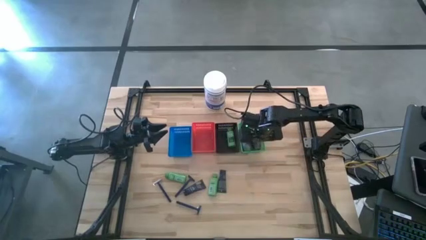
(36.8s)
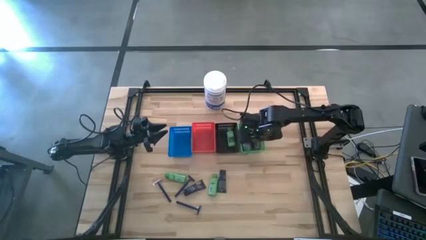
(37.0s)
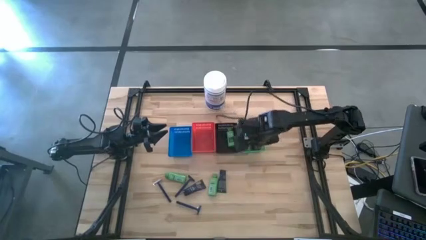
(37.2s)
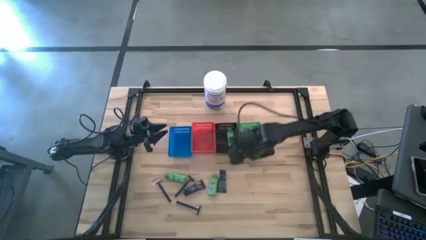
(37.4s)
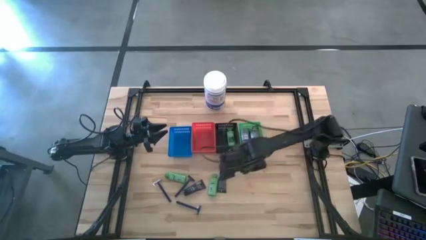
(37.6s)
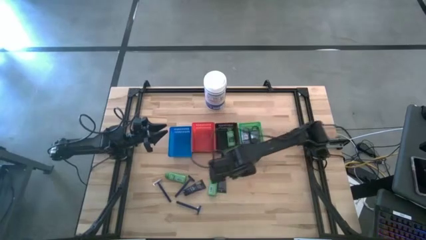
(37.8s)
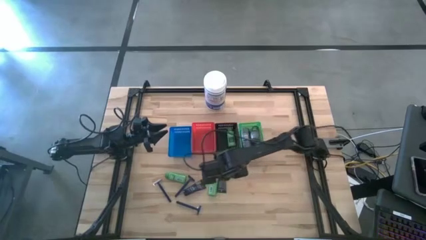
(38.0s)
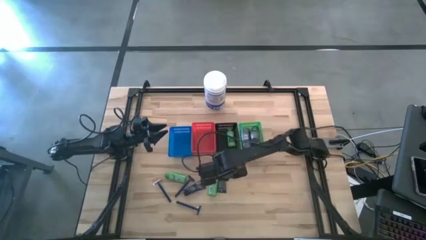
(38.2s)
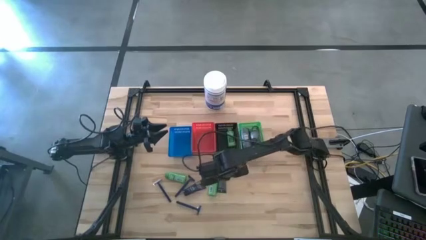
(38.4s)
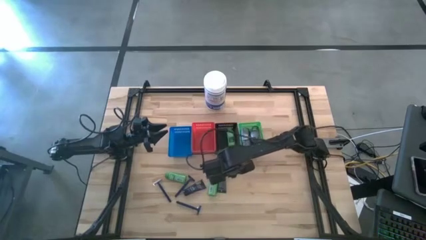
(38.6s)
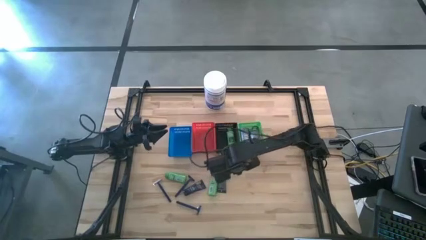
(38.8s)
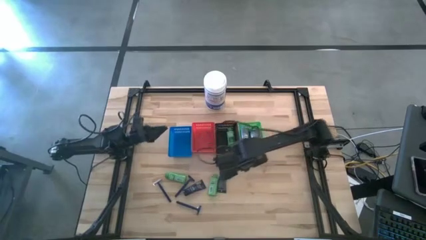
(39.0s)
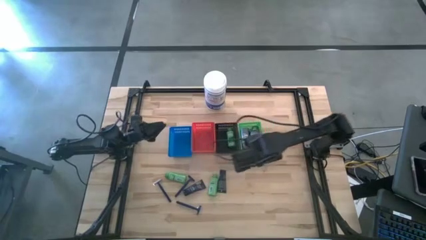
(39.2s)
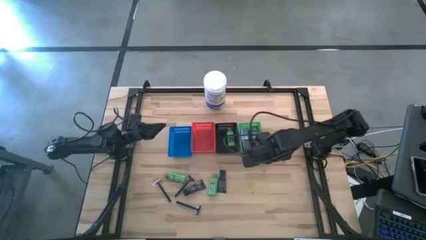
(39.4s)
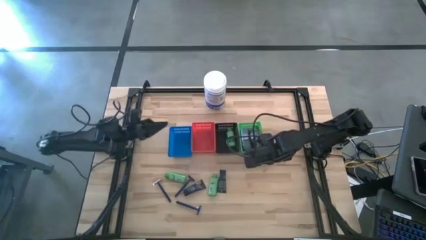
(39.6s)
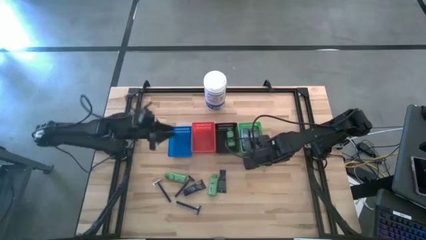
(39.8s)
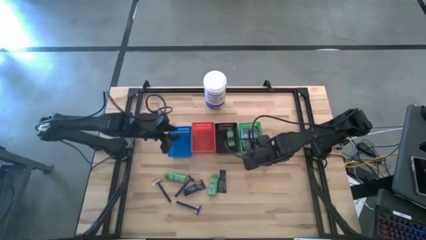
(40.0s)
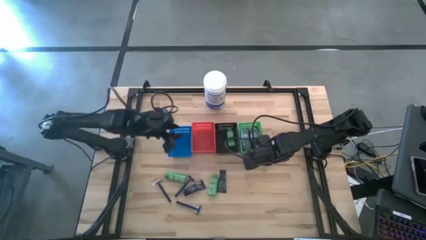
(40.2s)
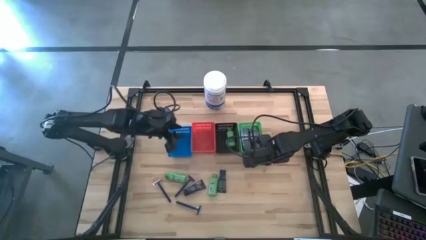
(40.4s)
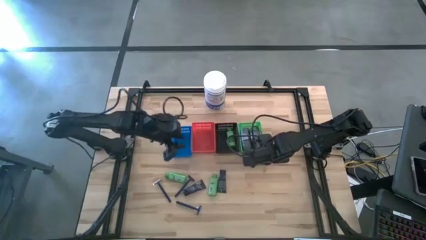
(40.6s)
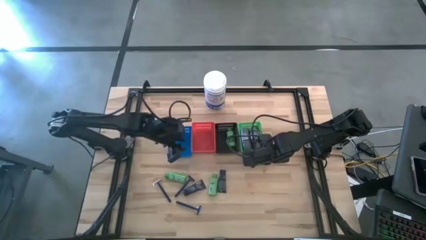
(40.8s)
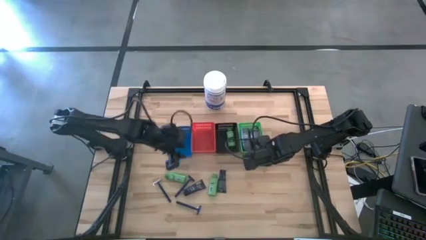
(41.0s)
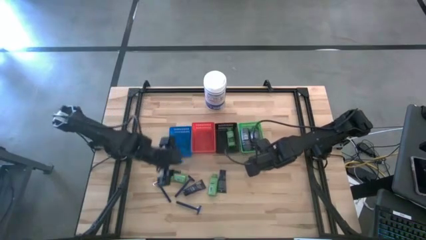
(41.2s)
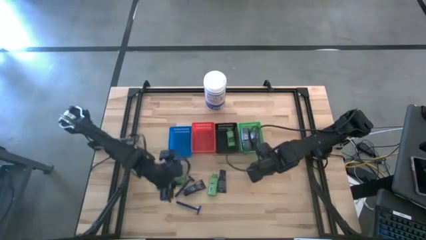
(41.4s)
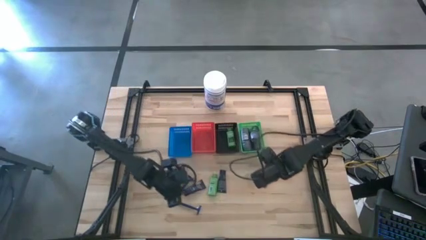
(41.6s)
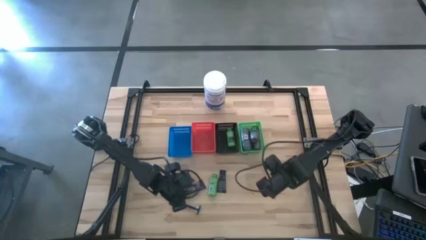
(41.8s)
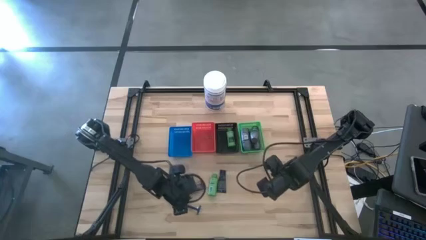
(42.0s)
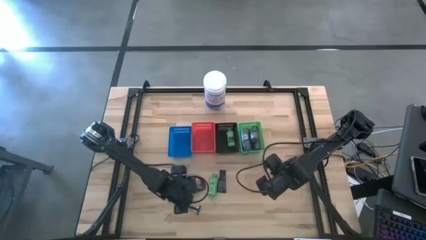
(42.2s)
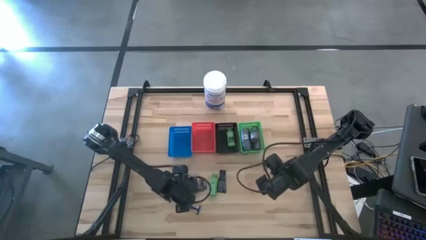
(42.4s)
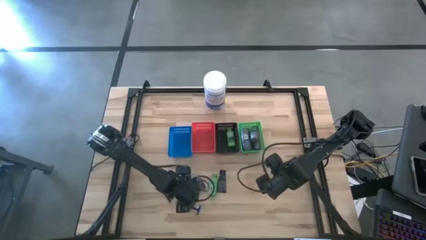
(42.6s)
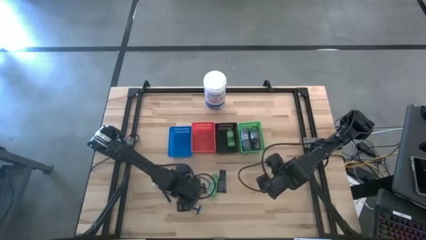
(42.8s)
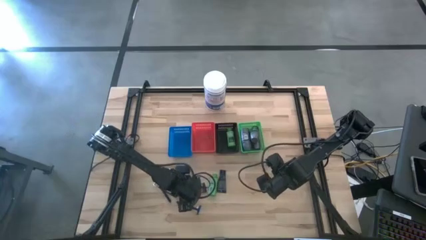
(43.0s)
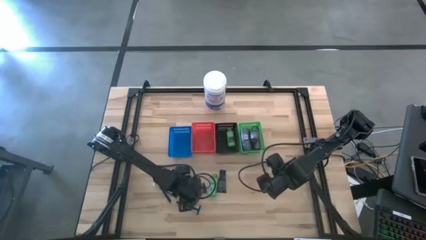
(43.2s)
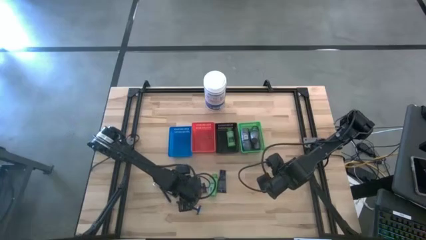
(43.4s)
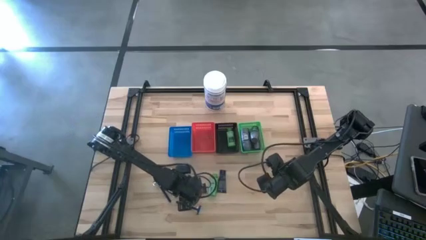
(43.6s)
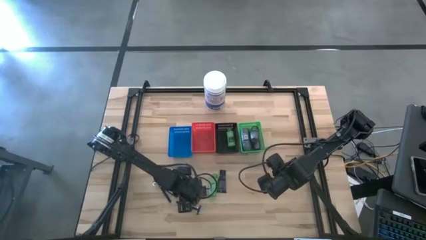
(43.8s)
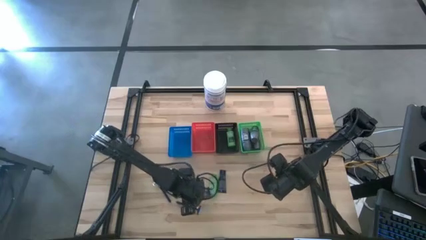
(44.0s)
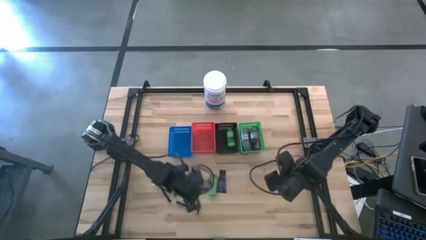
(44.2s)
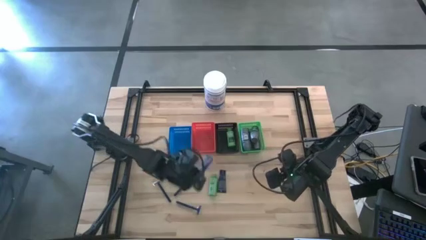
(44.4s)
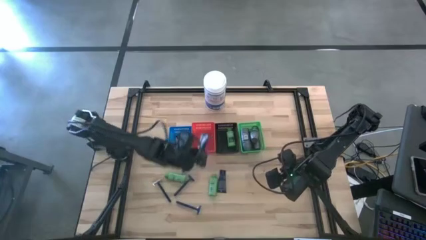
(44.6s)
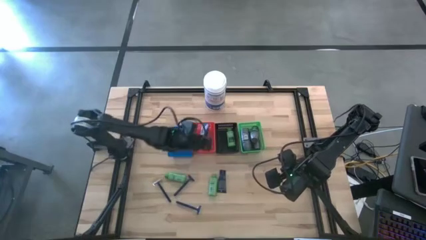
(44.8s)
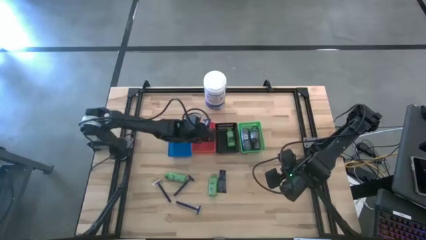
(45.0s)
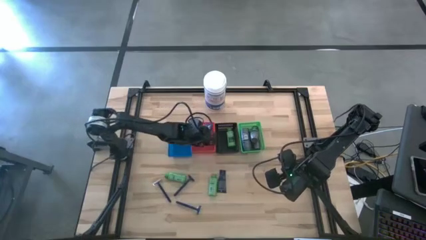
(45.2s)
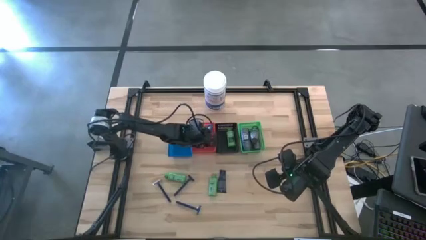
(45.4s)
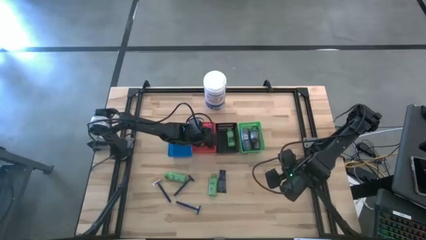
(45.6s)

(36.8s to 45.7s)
Task: Pick & Place Travel size toiletries
Put the blue shaving cream into the red basket

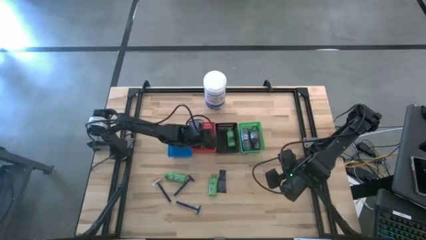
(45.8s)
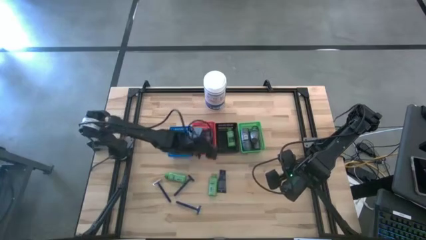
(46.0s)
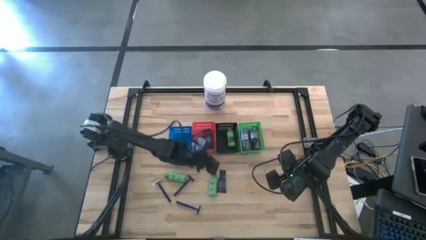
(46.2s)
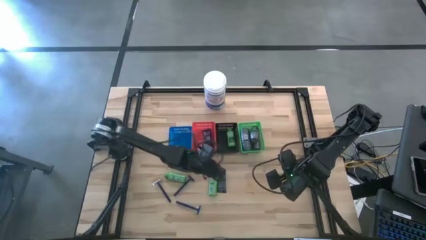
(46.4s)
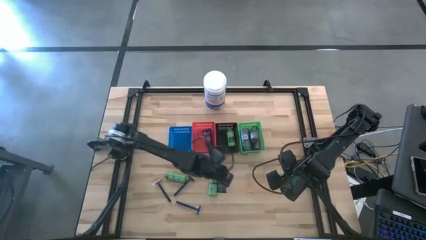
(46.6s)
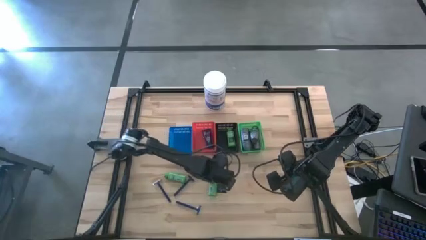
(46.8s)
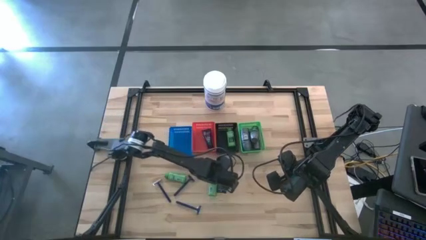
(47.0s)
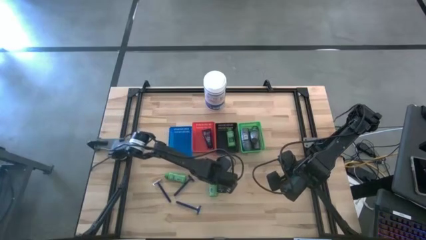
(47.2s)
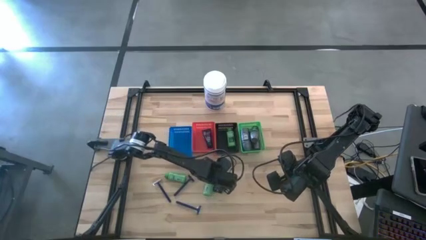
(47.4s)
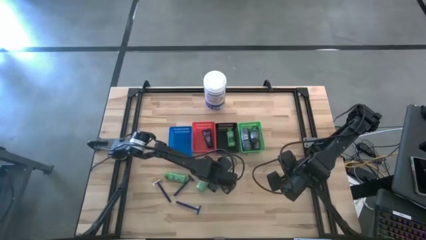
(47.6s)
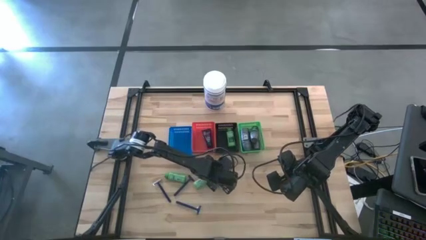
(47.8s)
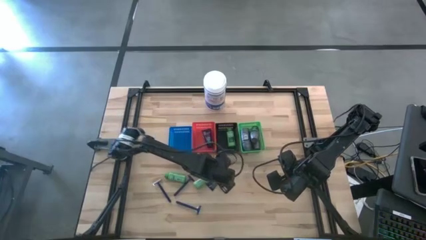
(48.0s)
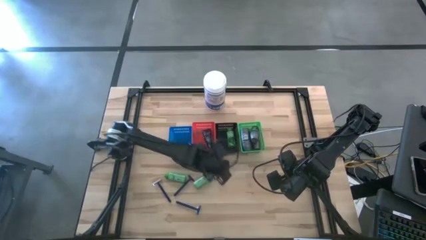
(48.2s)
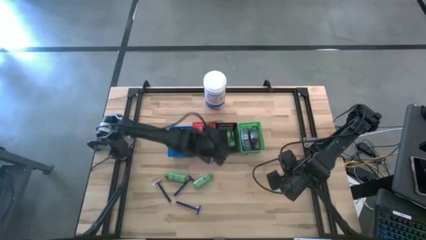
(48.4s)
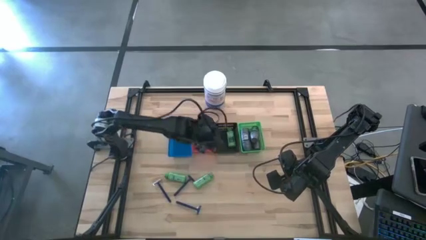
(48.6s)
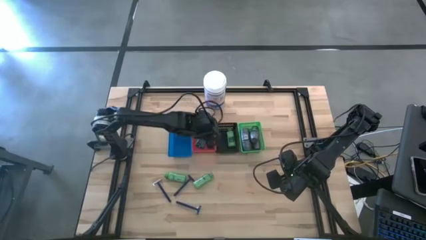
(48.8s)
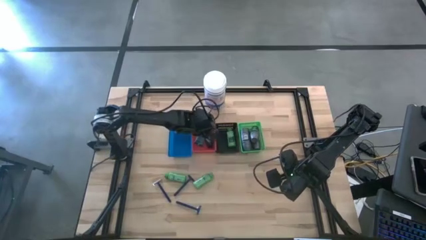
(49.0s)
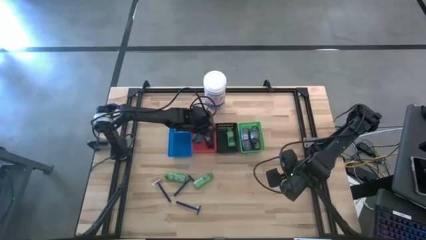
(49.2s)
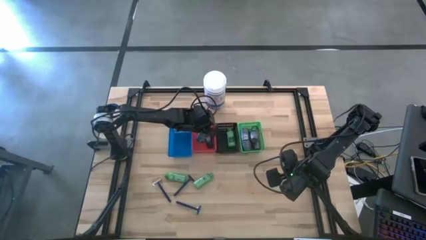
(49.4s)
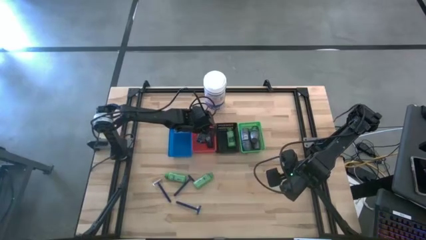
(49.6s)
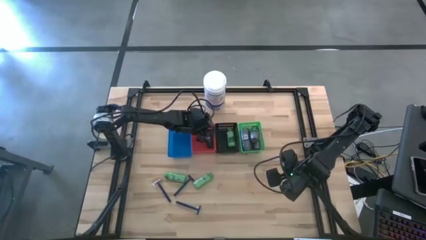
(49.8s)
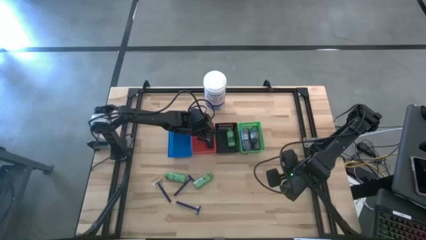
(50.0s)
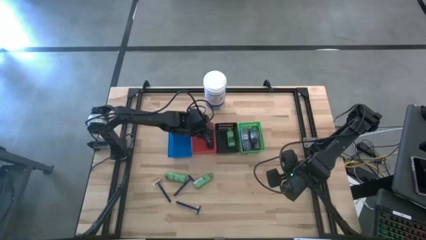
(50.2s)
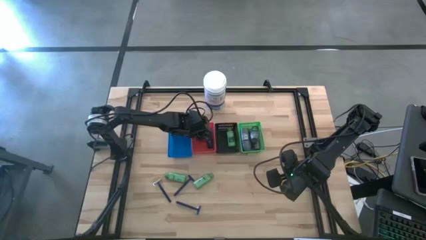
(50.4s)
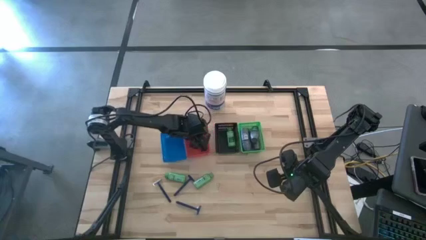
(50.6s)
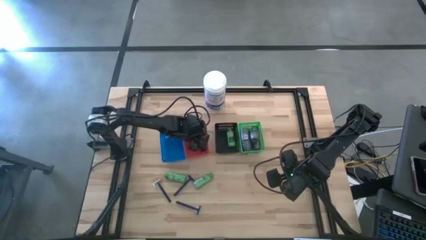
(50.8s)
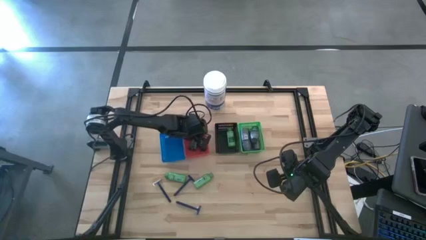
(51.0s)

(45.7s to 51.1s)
Put the blue shave cream into the red basket

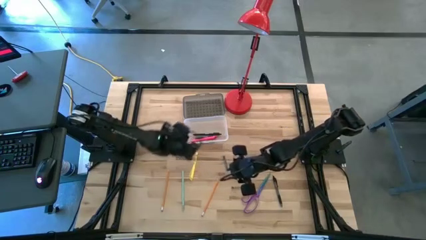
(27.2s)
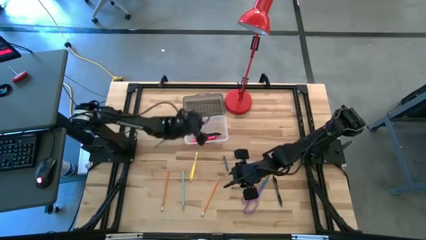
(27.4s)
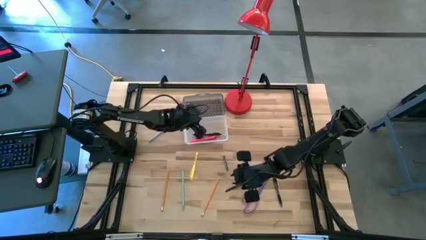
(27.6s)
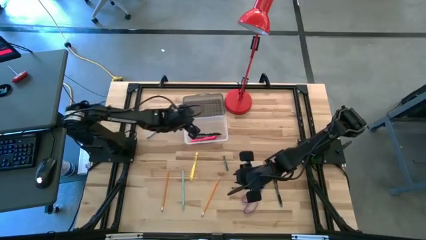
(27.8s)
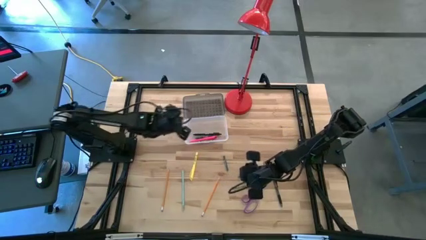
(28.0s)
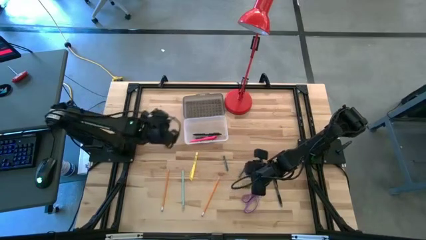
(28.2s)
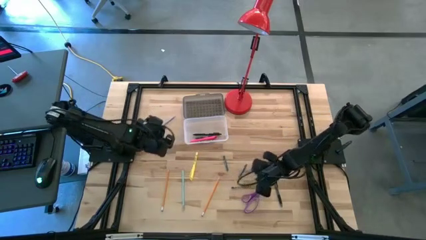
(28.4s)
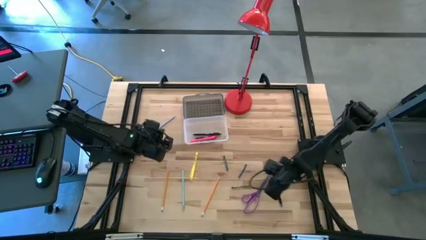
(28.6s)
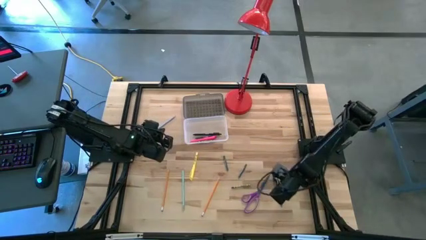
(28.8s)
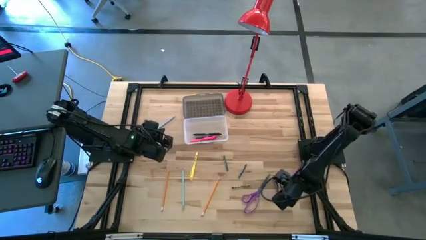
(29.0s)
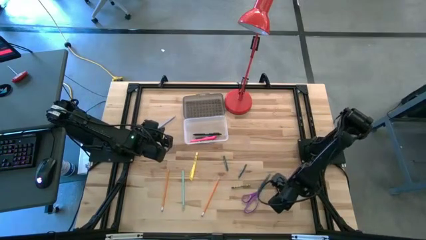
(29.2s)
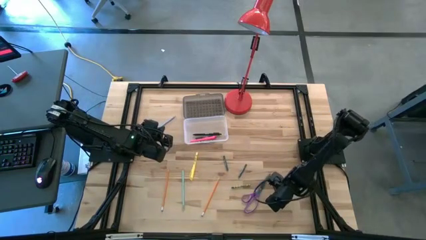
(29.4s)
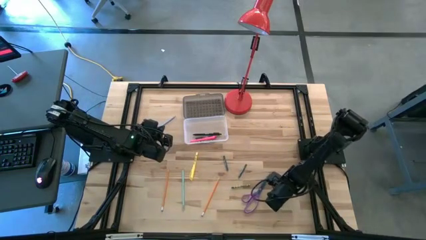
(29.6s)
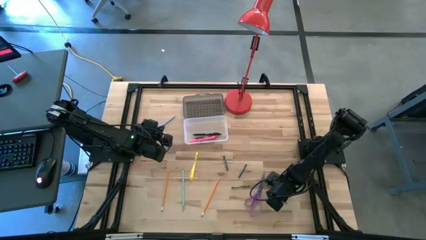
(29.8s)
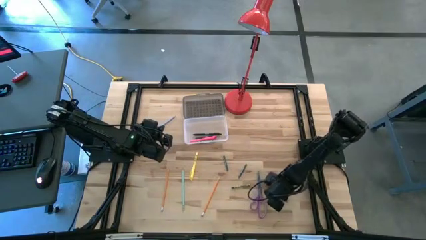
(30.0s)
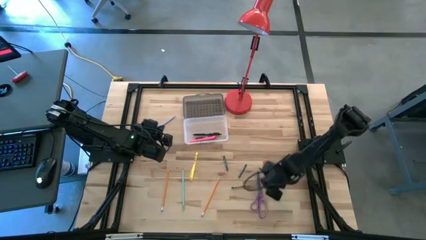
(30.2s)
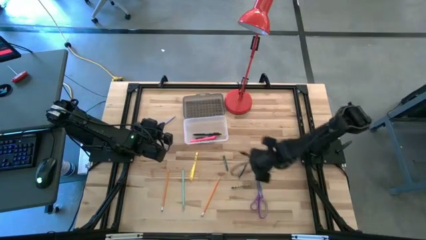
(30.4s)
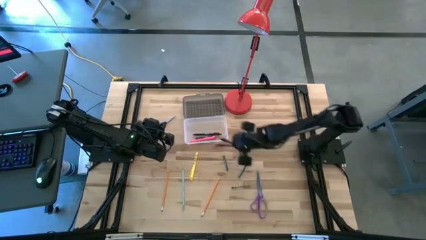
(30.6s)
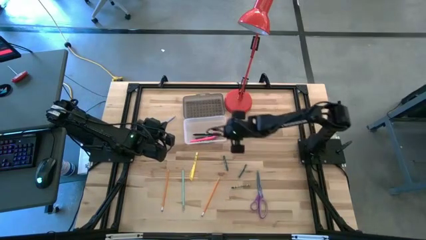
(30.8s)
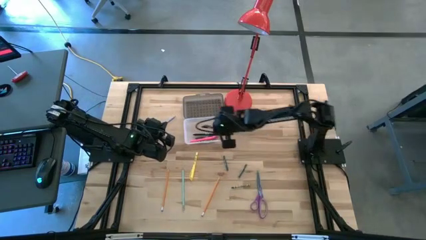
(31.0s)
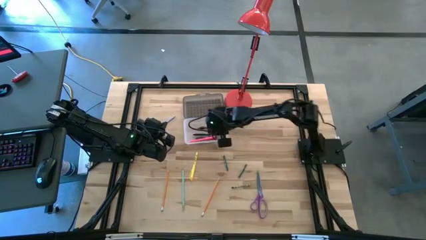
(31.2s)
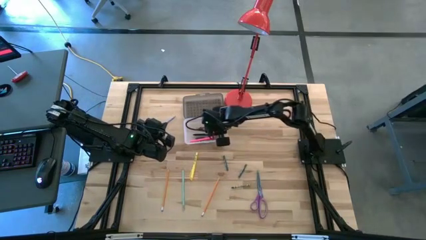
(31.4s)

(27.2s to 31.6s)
Task: Pick & place school supplies into a supply box
Put the black pen into the black supply box
